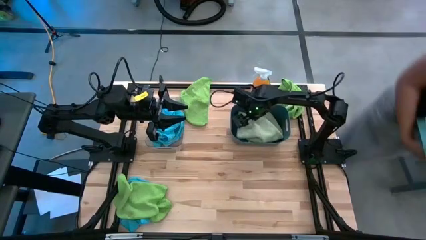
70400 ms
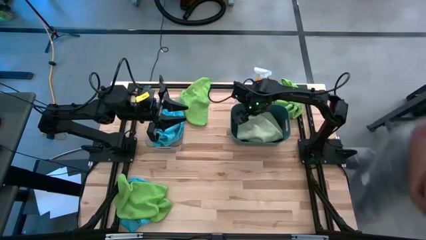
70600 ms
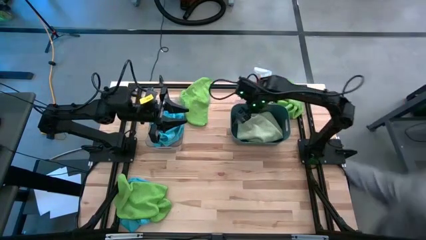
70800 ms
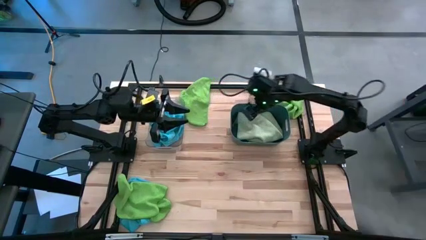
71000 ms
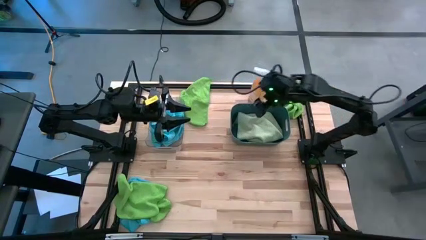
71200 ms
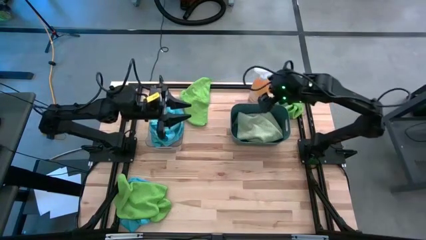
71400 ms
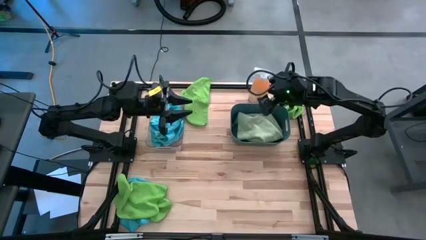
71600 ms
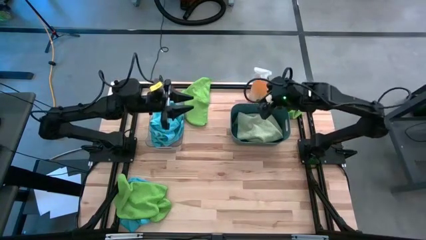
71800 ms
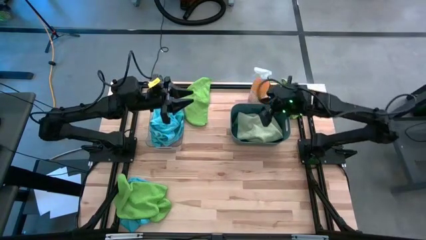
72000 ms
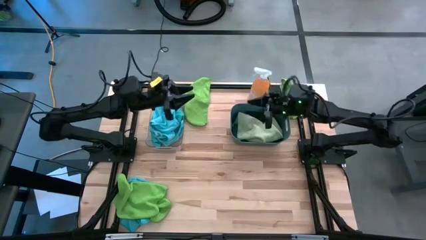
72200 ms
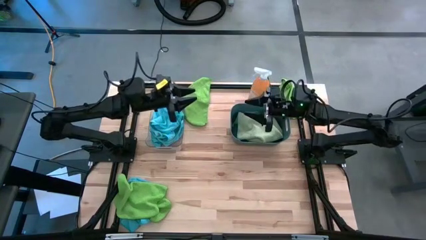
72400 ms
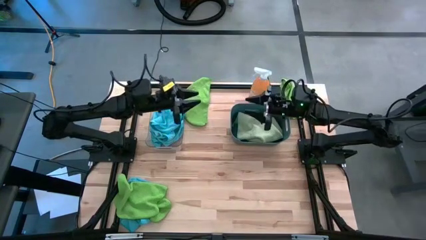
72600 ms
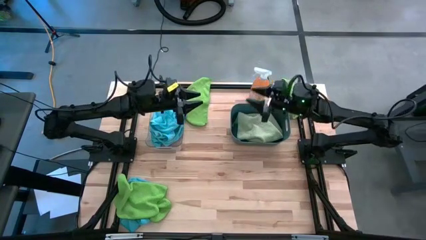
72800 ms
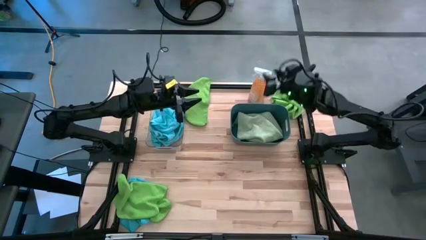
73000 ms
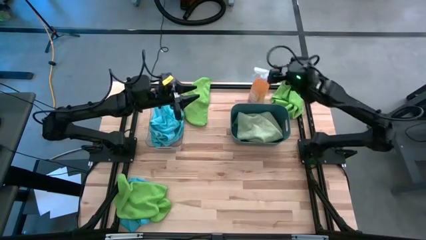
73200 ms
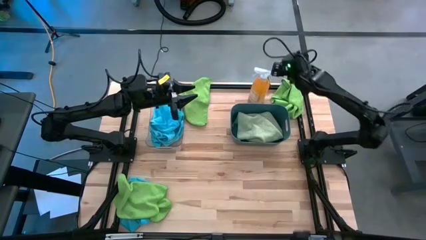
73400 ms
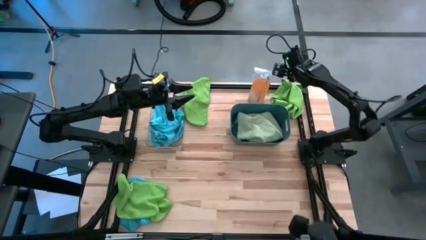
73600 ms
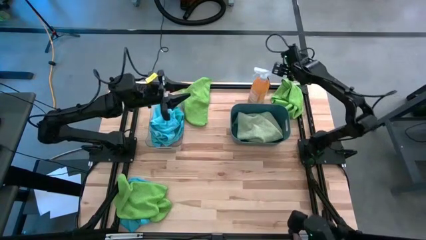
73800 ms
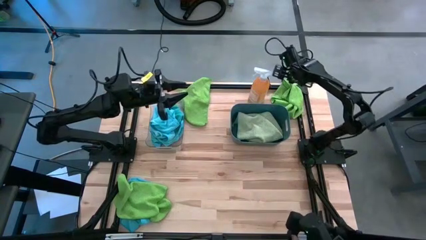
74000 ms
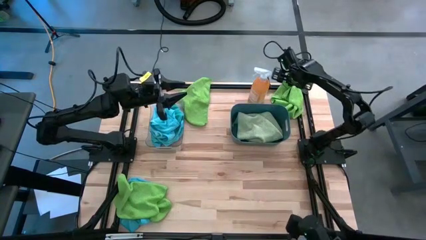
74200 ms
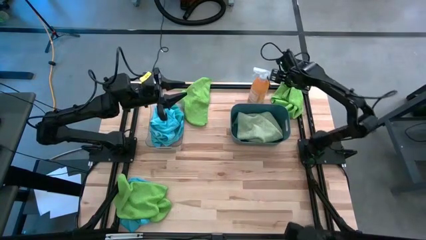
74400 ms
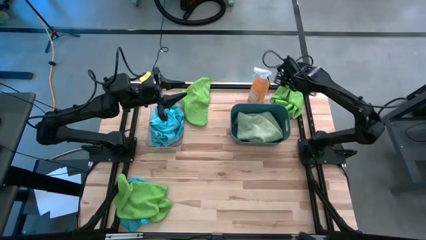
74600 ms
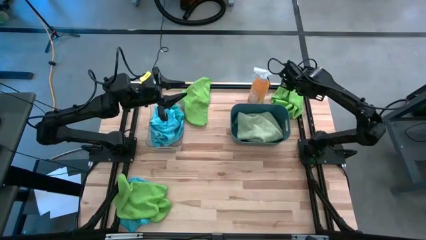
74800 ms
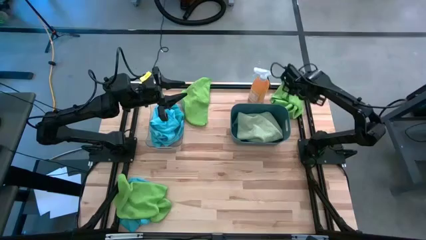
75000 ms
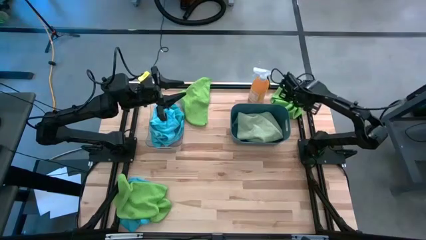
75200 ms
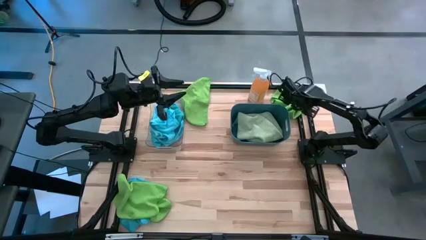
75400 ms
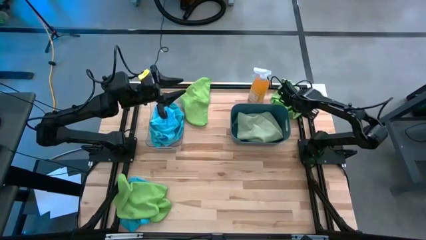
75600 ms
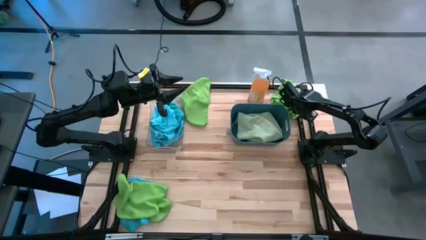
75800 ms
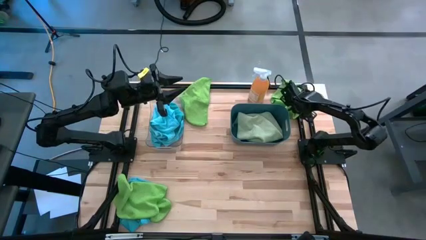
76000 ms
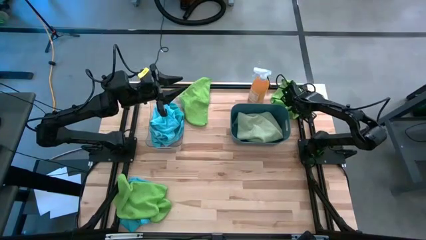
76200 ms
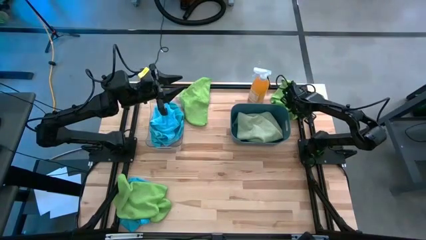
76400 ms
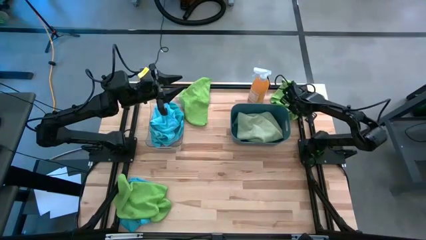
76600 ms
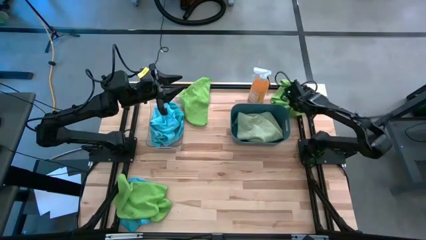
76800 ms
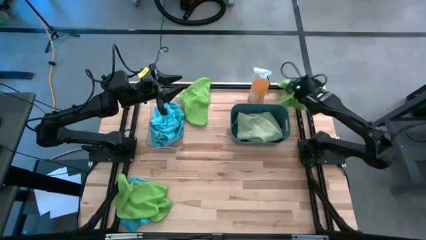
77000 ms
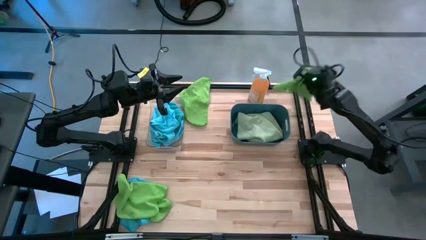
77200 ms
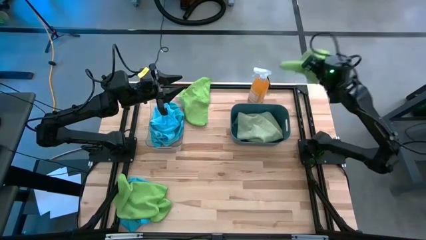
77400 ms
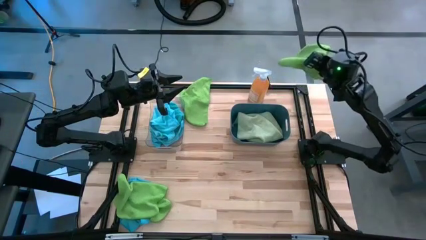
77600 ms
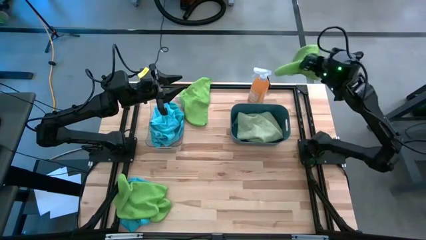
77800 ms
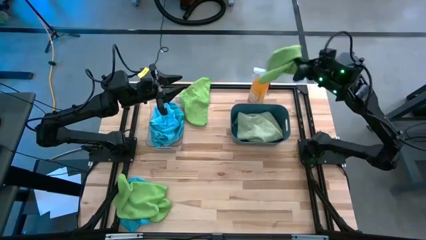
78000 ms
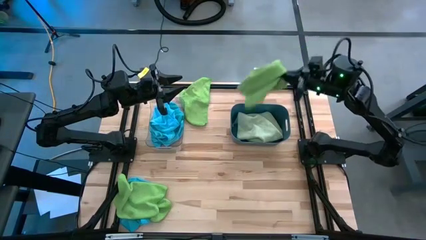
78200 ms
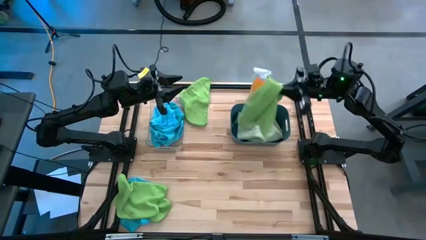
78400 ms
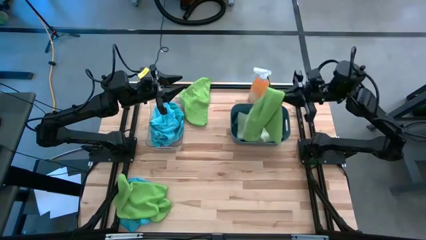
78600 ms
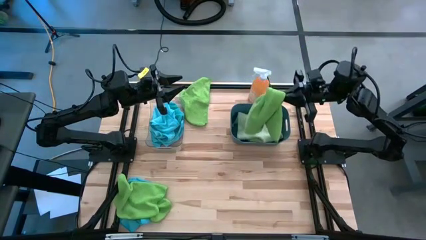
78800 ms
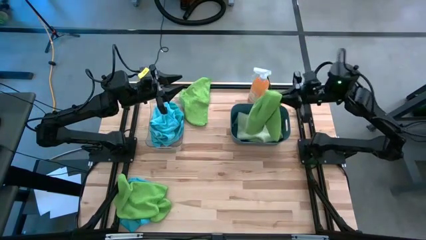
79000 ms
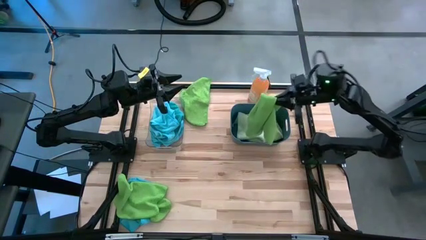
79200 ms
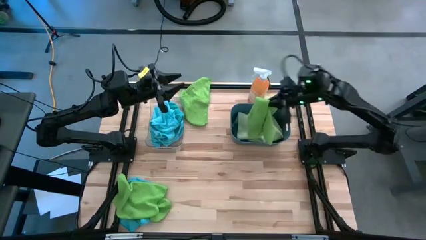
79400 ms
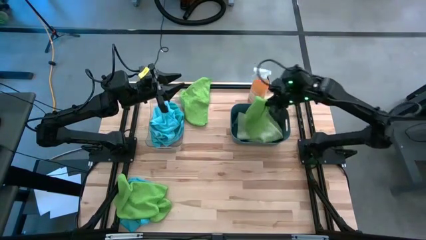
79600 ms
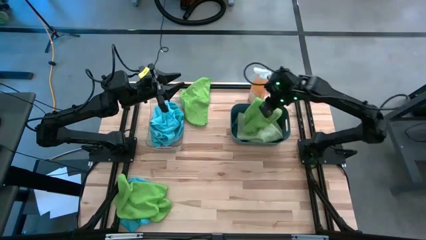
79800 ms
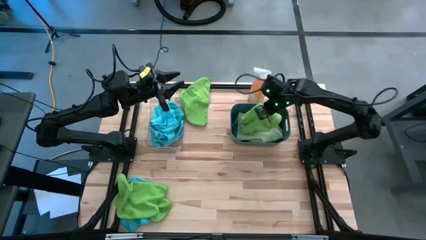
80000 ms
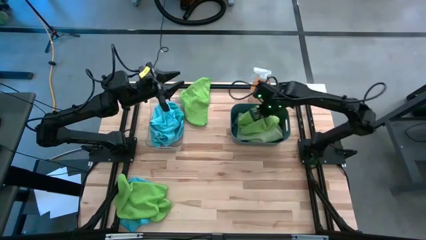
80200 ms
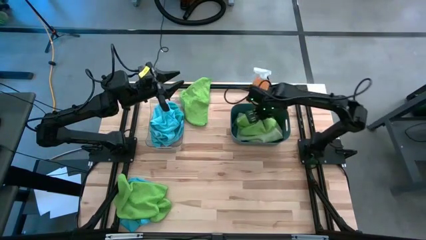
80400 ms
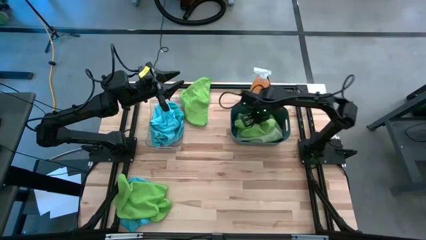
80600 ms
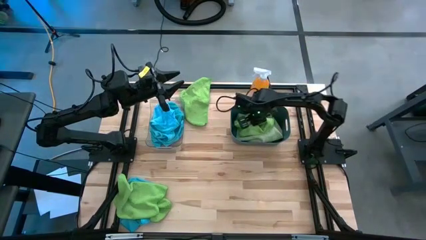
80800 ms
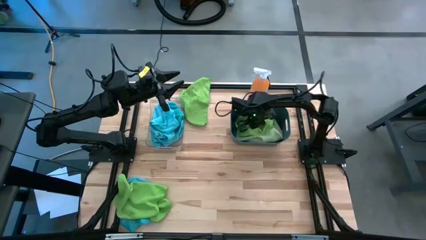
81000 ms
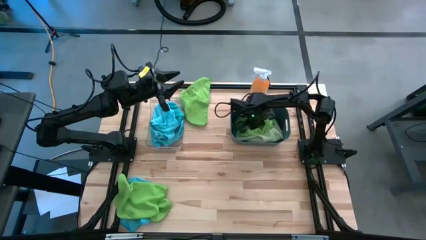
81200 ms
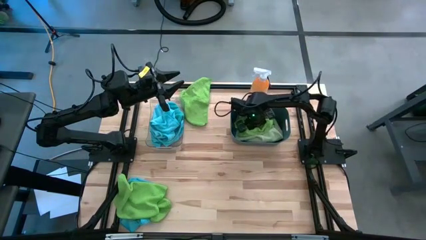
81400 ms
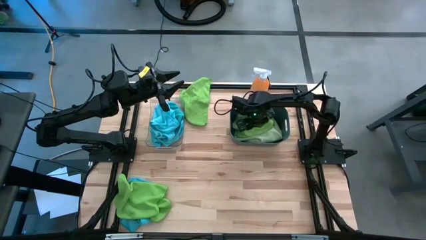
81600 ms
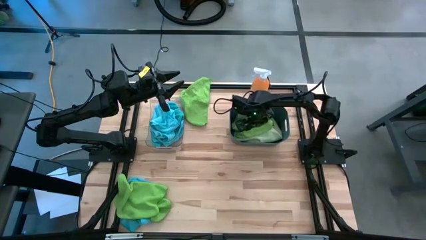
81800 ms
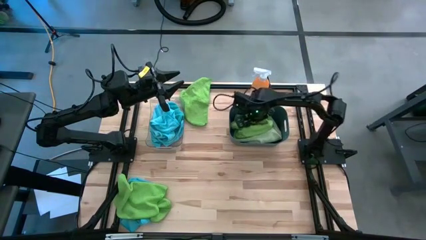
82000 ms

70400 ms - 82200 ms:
Task: Sort microfiber towel by color & place in baskets
Put the green microfiber towel into the blue bin

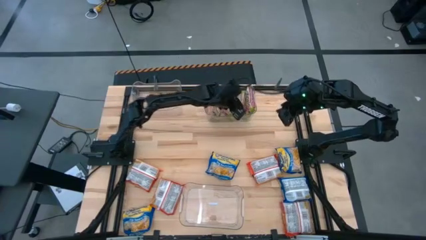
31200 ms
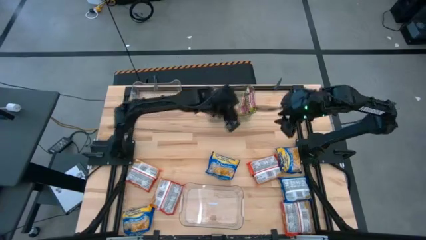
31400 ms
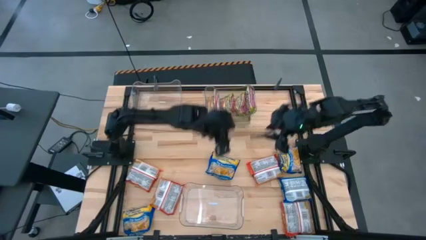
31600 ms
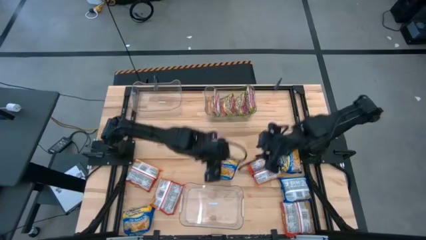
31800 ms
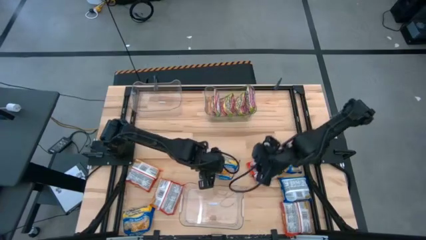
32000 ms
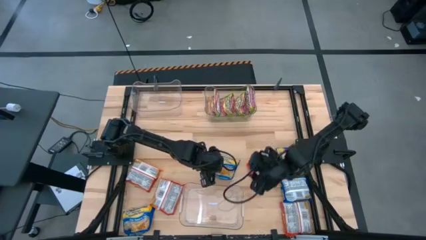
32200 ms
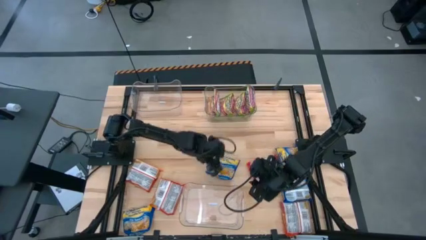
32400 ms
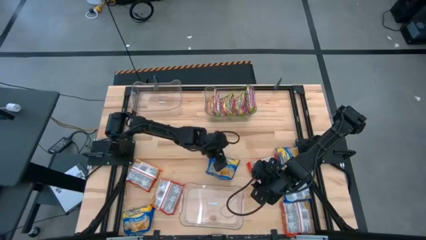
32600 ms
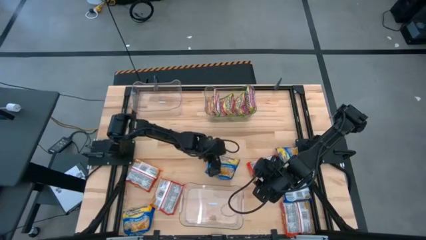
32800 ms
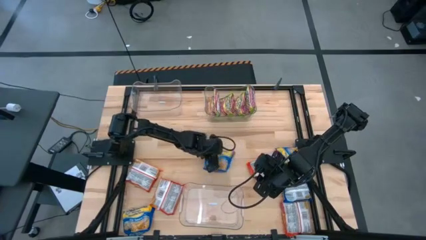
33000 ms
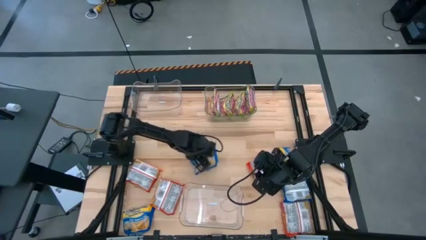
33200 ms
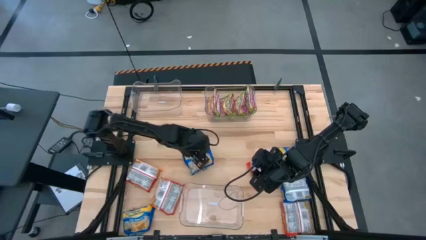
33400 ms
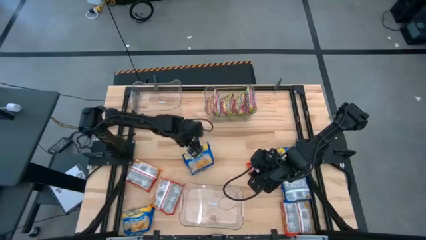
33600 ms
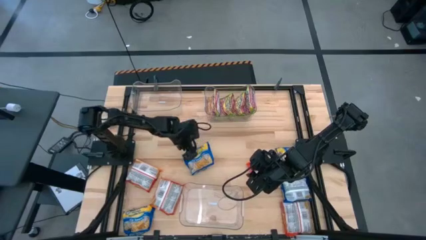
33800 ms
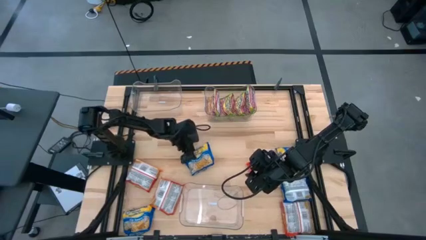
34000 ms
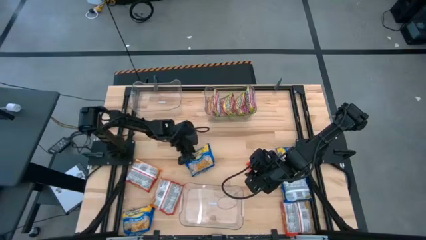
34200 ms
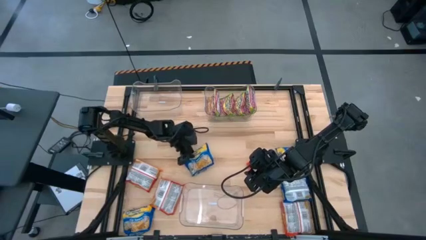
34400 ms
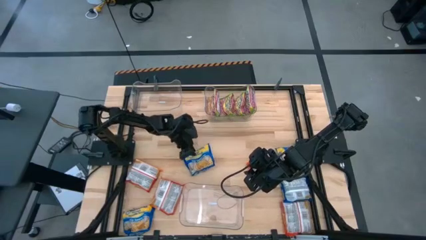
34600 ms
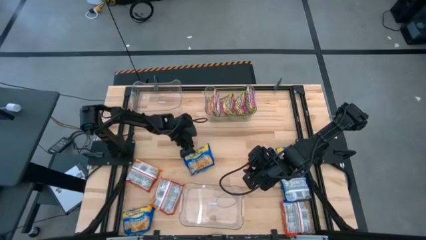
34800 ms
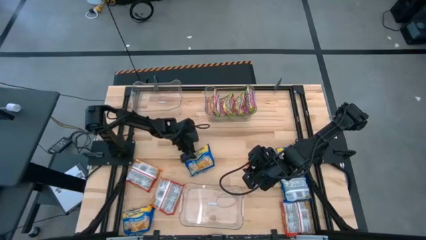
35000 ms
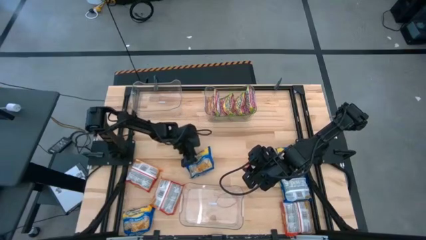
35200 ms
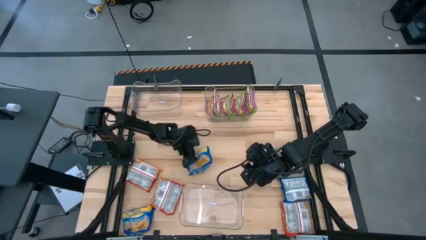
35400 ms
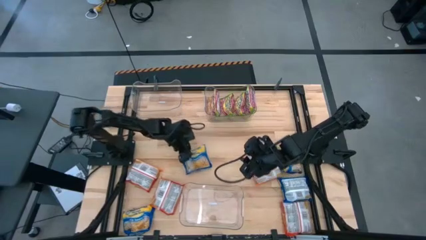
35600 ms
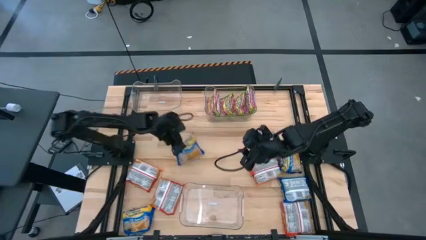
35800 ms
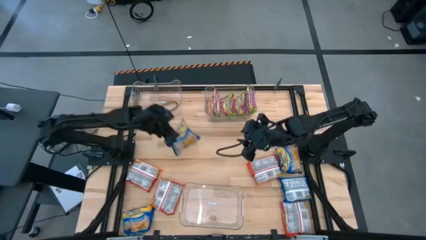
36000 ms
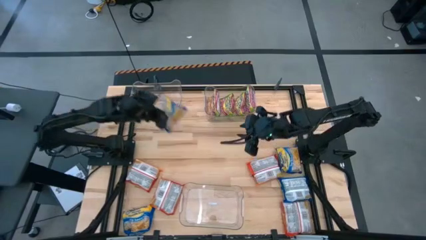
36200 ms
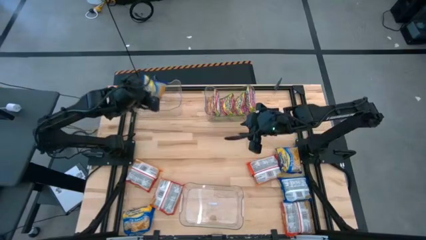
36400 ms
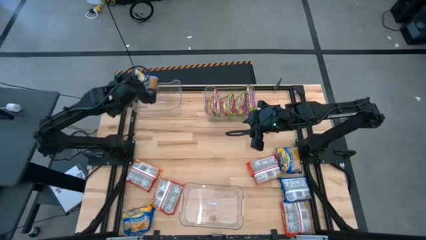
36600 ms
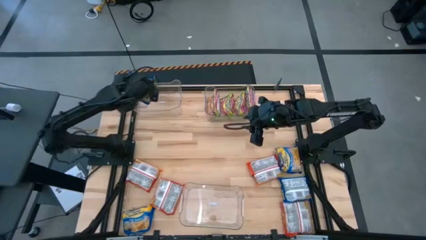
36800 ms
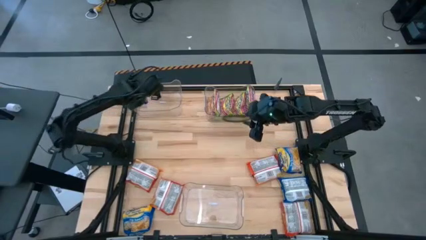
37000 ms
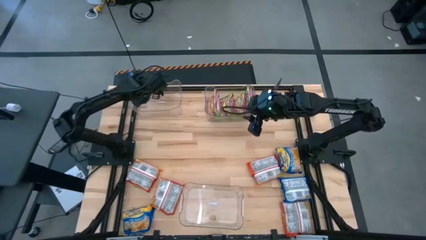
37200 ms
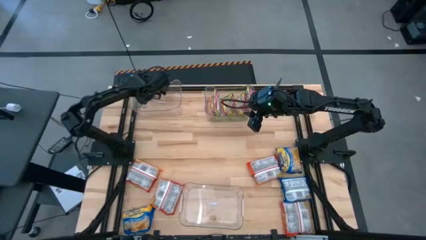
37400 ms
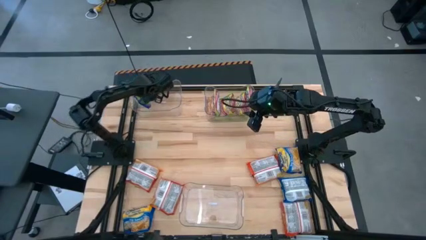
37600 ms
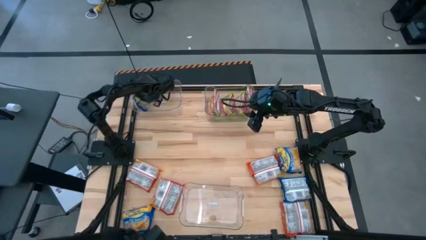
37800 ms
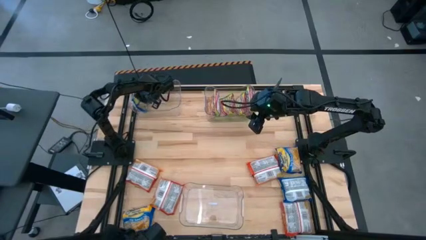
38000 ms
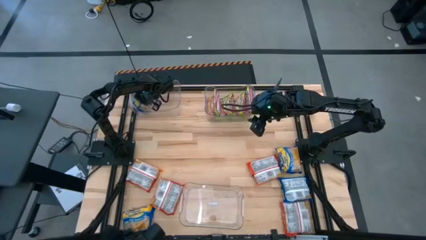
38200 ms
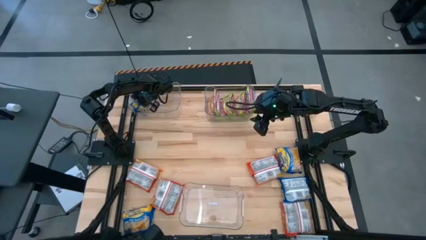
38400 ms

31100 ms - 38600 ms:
Task: Sort Maruchan noodles
Put the blue noodle pack into the top left transparent bin
